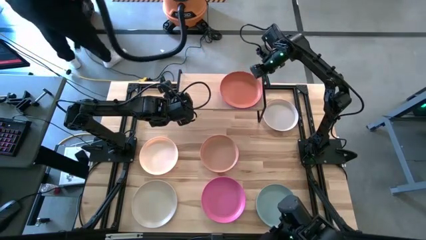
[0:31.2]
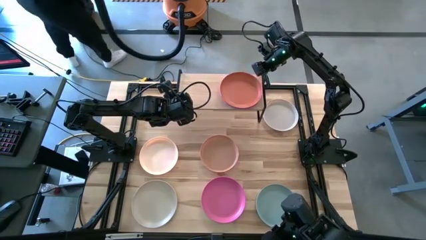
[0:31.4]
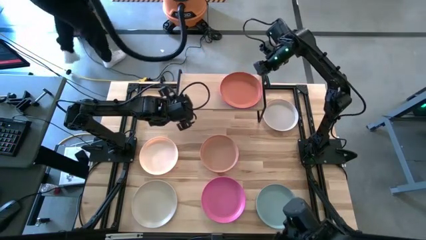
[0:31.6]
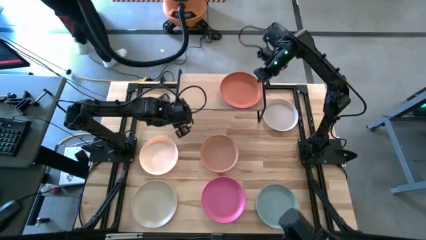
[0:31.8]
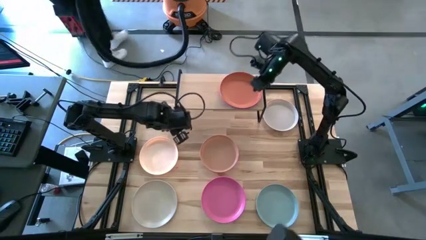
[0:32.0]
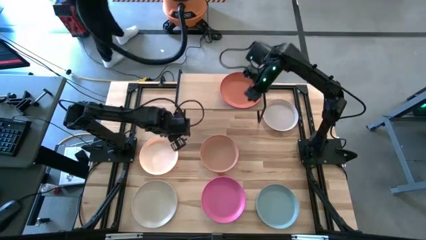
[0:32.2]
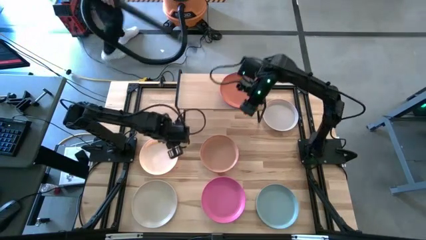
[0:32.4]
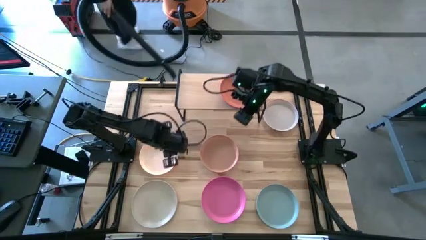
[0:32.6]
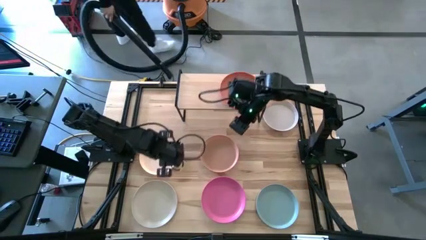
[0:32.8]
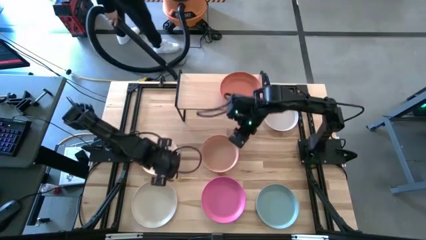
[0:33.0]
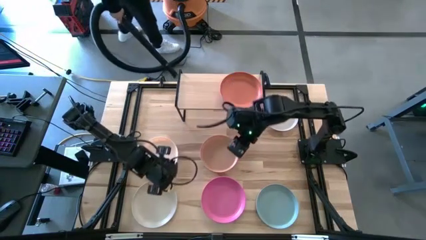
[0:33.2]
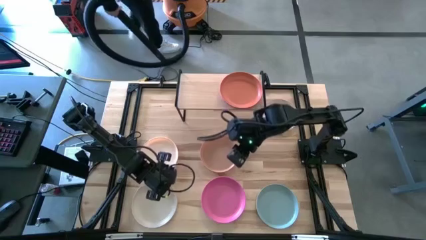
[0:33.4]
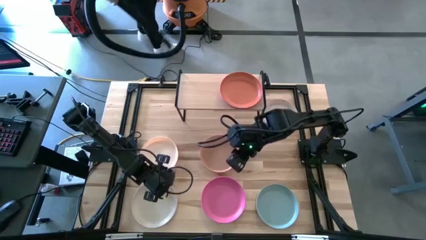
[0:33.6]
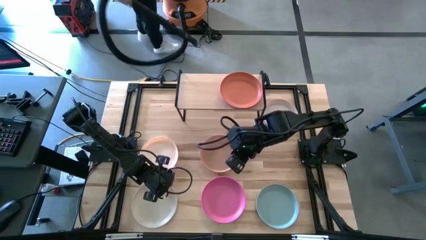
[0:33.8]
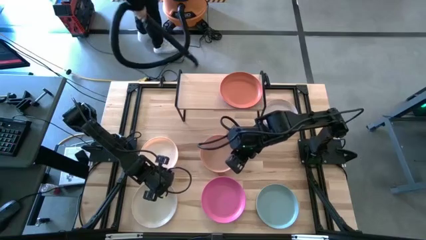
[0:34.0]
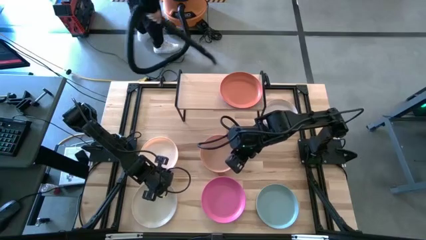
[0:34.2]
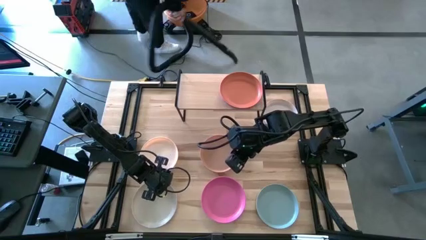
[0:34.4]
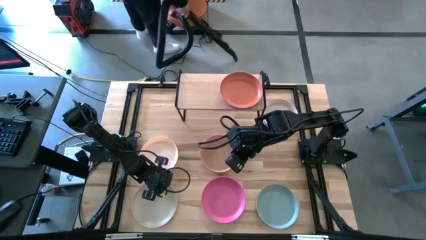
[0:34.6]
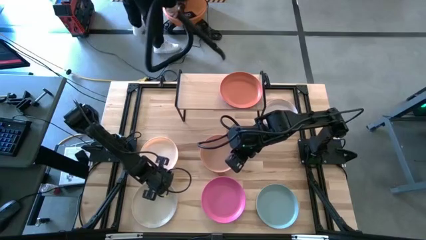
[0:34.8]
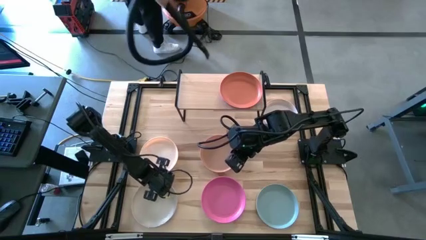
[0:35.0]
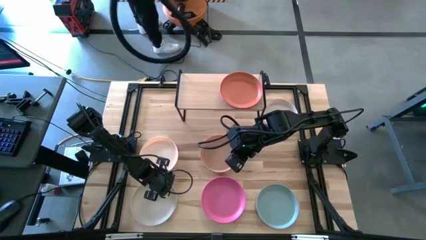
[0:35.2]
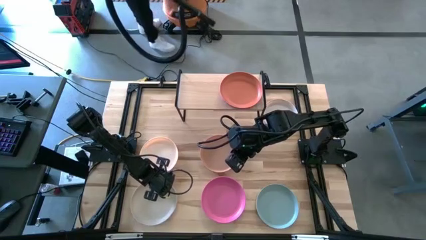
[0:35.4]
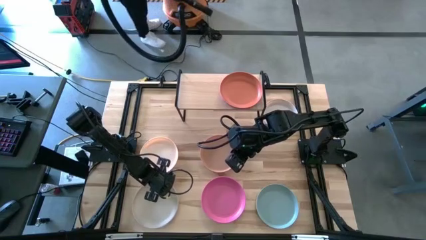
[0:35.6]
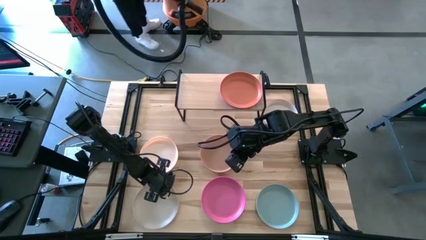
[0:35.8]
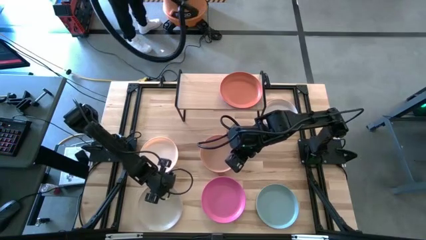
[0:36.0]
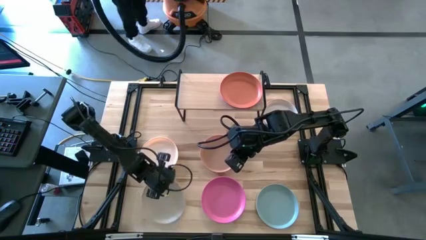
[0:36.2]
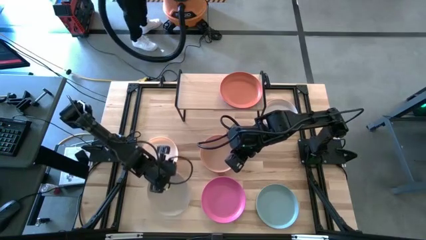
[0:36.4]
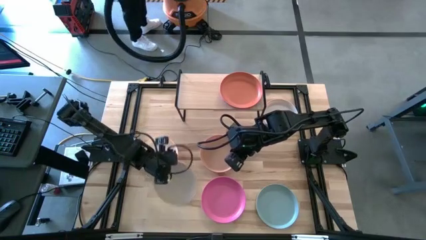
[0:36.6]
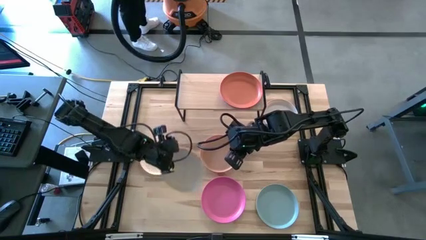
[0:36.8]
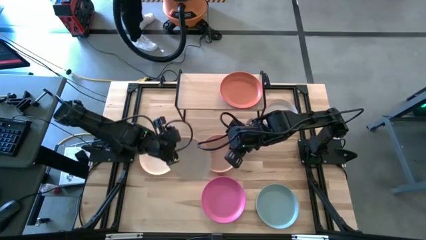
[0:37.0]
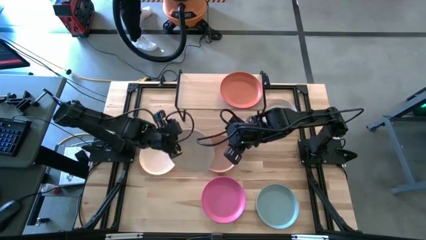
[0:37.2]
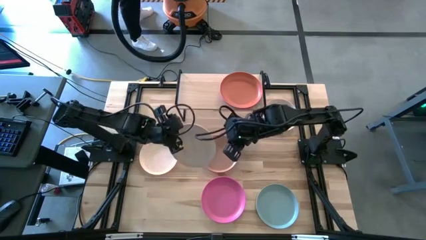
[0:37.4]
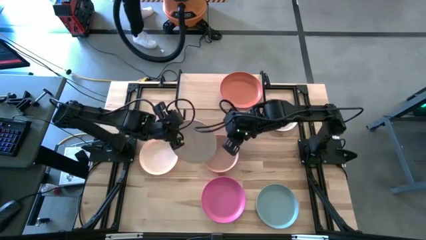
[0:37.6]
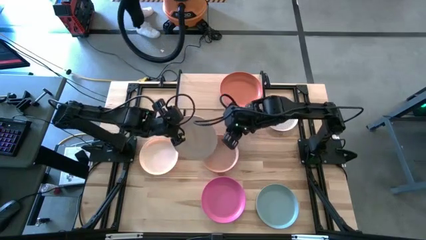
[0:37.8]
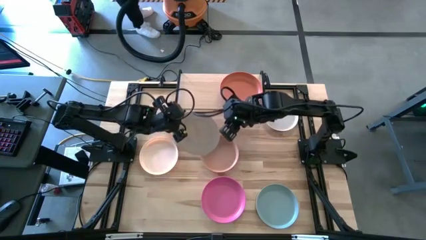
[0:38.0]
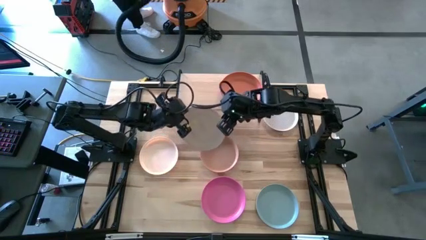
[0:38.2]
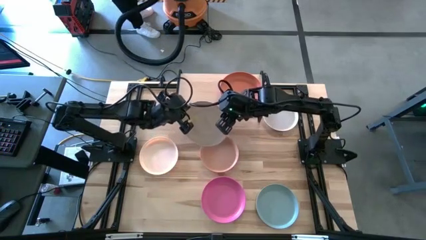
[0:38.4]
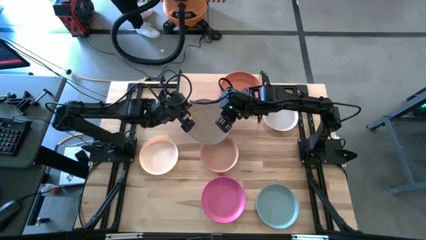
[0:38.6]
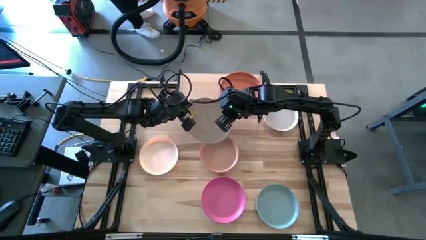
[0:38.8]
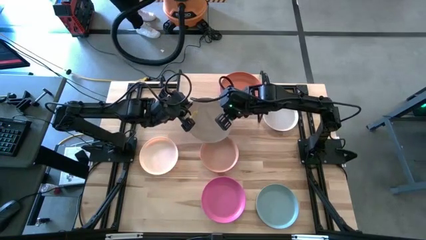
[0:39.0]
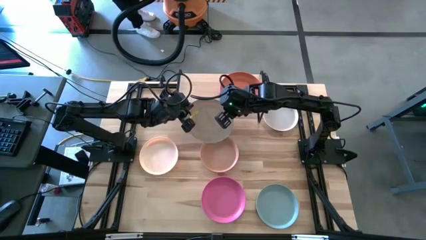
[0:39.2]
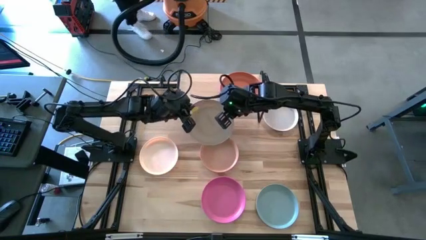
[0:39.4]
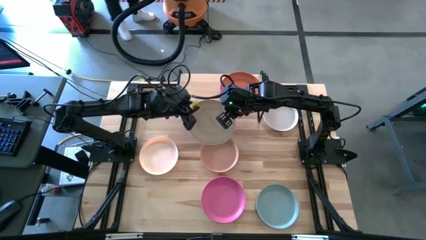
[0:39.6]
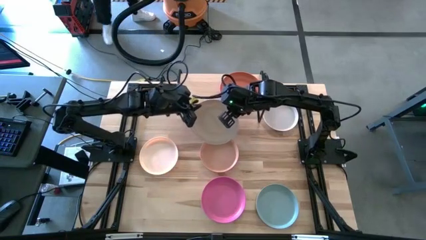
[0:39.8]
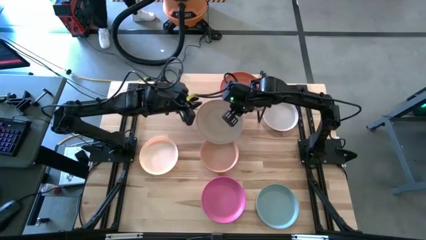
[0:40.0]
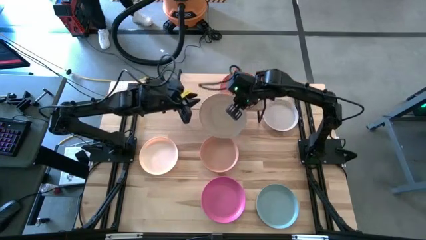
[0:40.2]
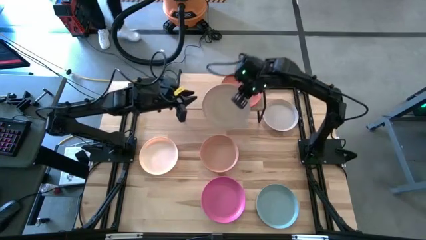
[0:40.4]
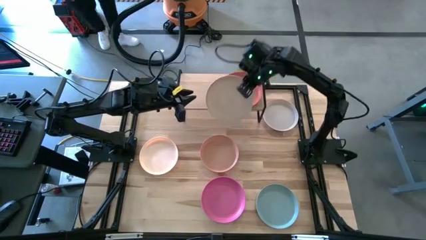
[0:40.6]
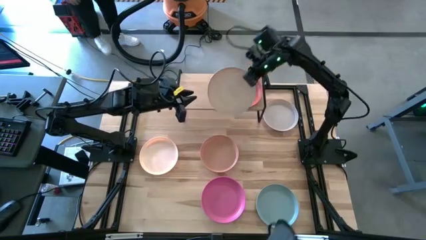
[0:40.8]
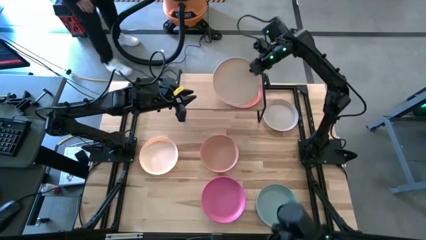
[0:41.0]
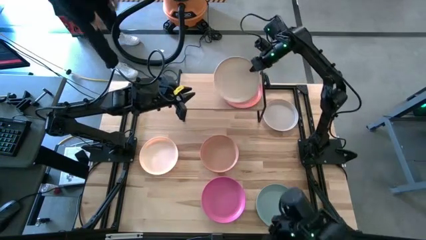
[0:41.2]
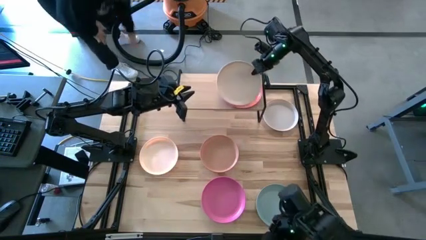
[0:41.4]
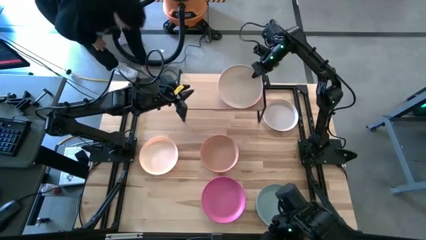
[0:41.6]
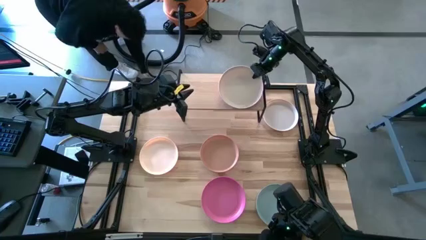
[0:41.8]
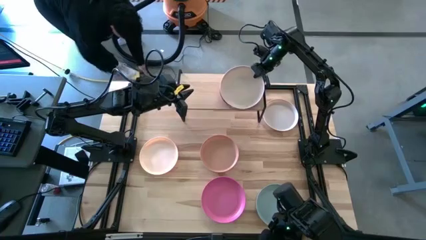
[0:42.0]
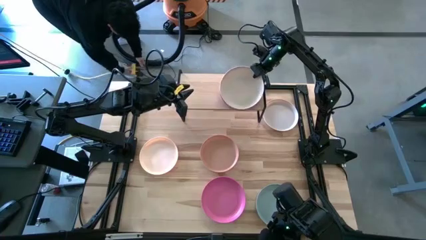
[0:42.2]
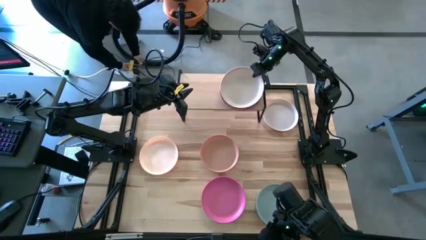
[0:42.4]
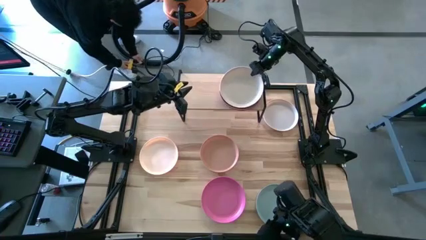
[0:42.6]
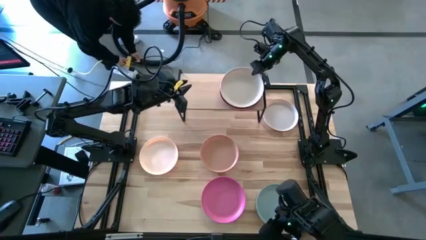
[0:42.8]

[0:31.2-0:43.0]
Task: Place and stack plates onto a shelf
Stack the gray plate on top of the orange plate
